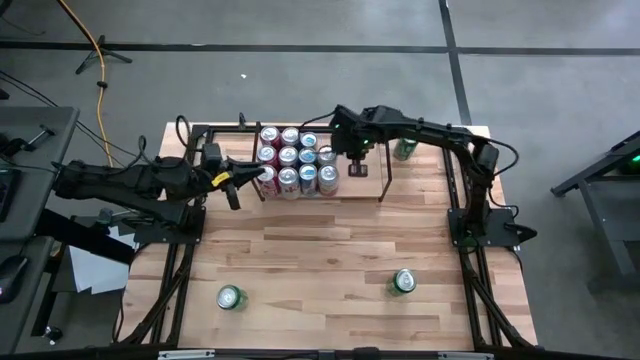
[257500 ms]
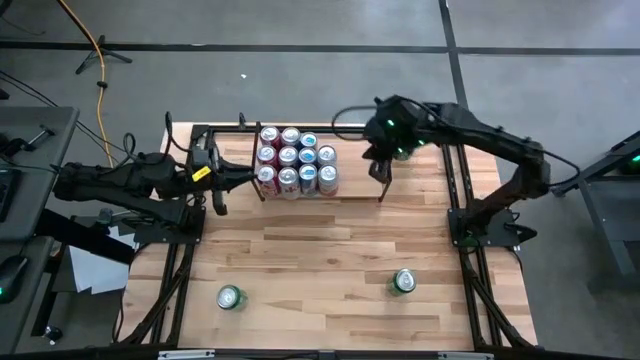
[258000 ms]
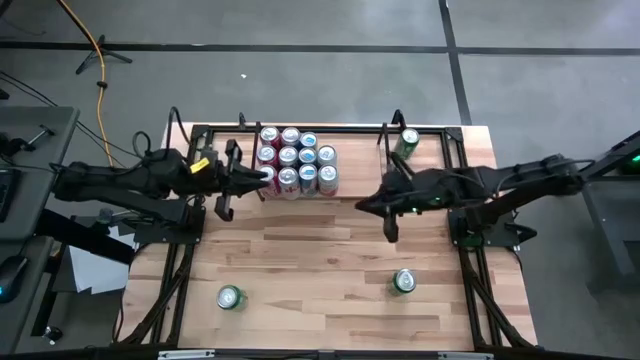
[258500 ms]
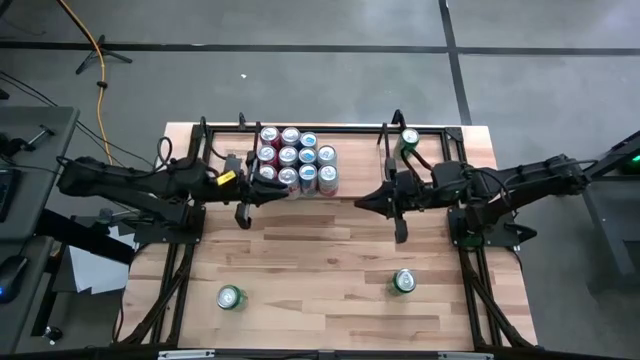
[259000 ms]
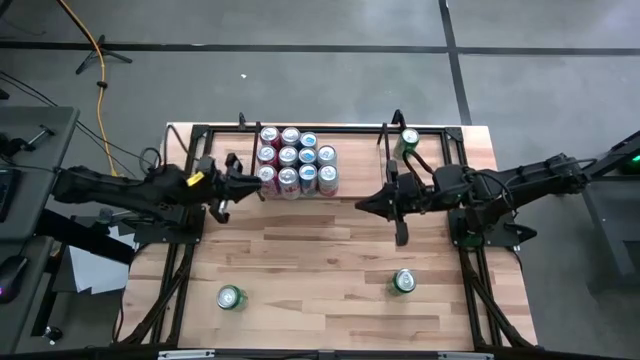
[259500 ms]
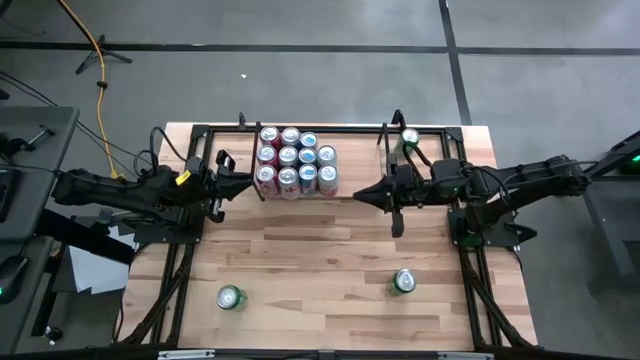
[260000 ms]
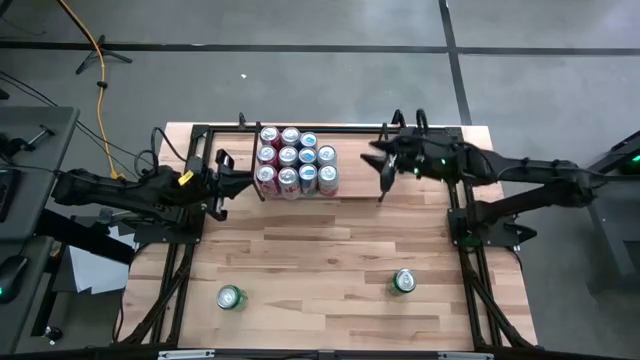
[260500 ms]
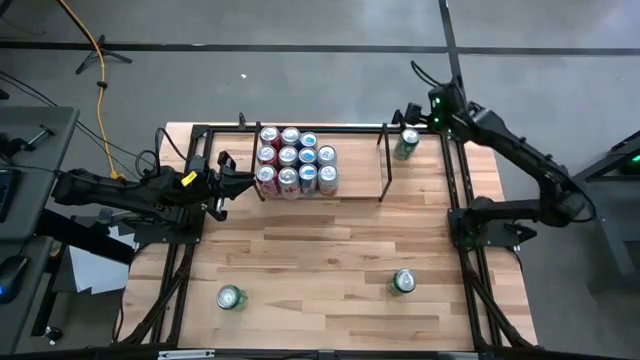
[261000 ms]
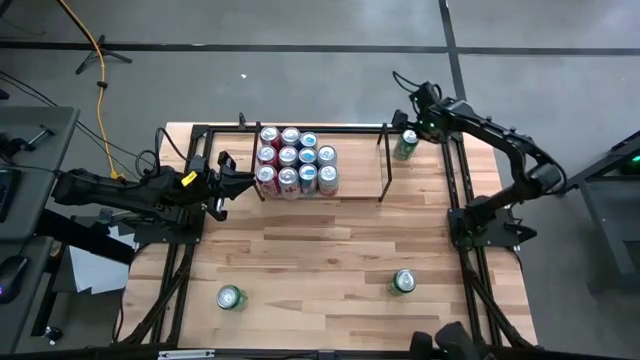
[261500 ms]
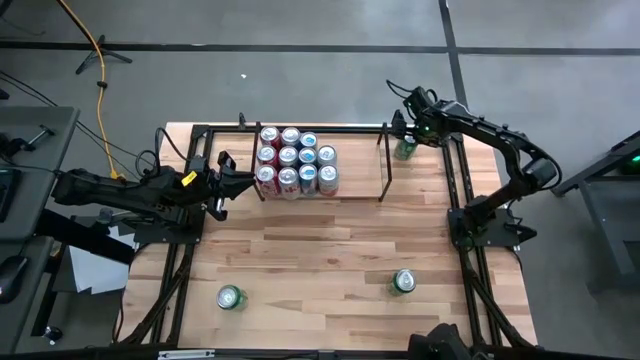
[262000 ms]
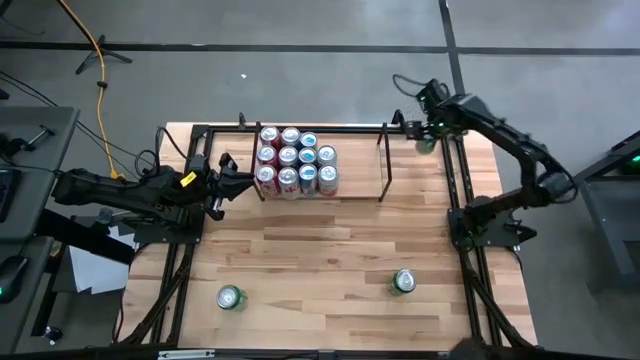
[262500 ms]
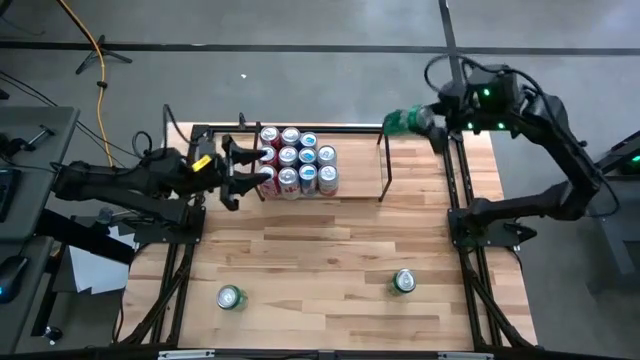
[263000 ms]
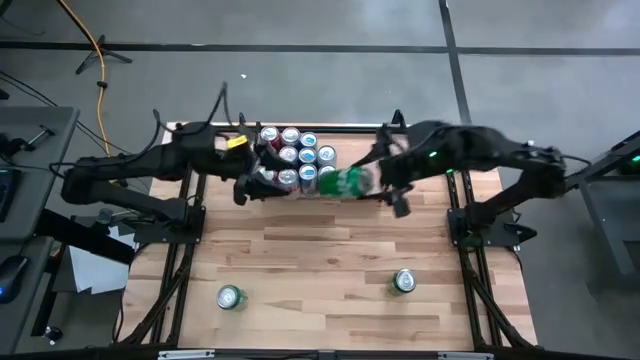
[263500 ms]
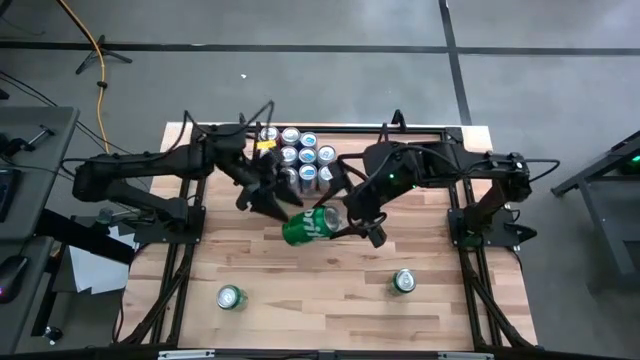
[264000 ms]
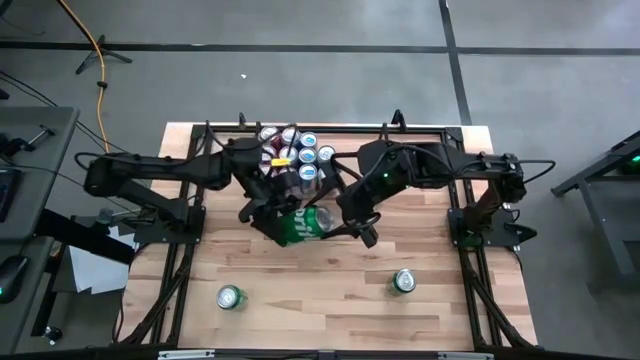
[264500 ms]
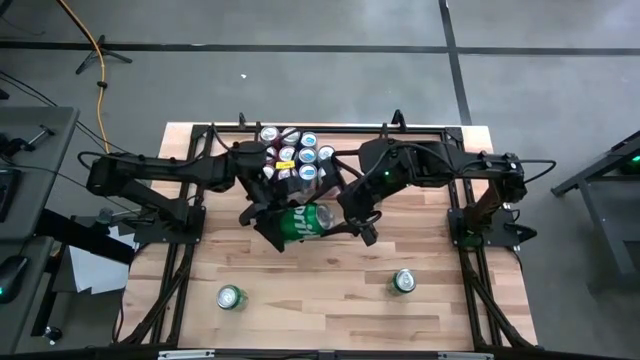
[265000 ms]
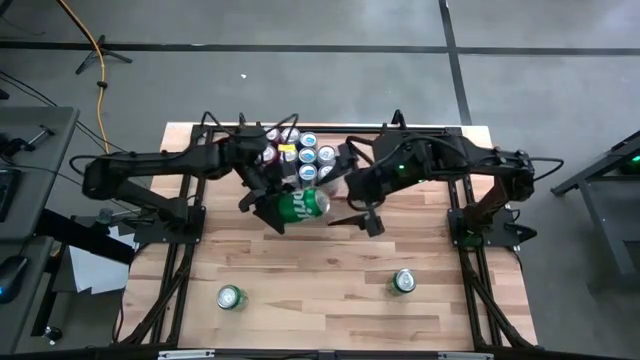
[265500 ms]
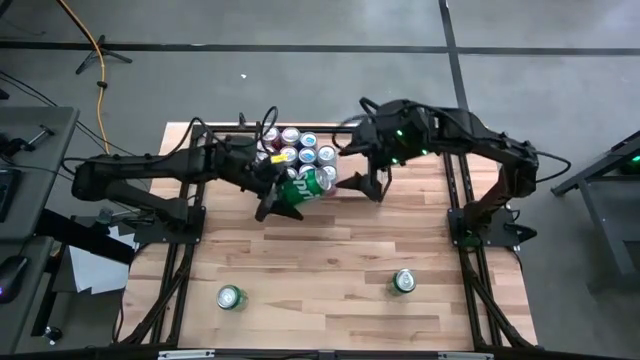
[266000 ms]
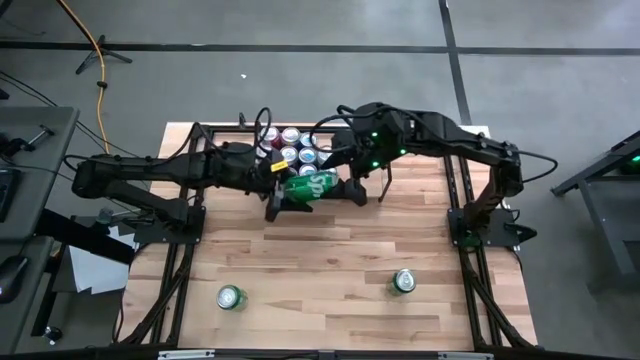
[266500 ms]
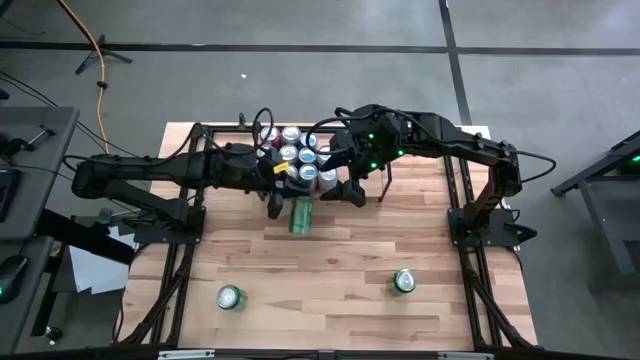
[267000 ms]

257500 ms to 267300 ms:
Task: Place canned beverage on shelf
Put the top green soda can on the shelf

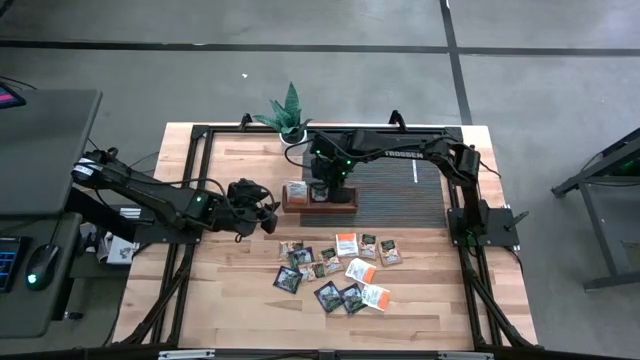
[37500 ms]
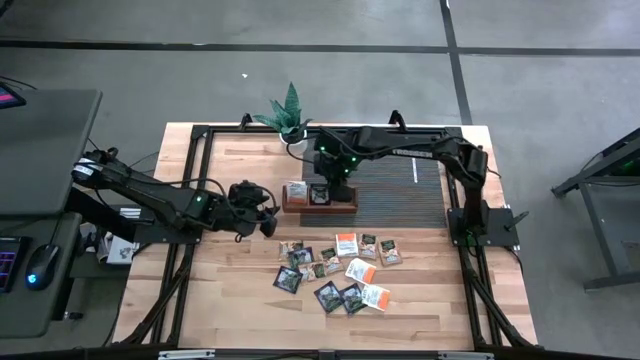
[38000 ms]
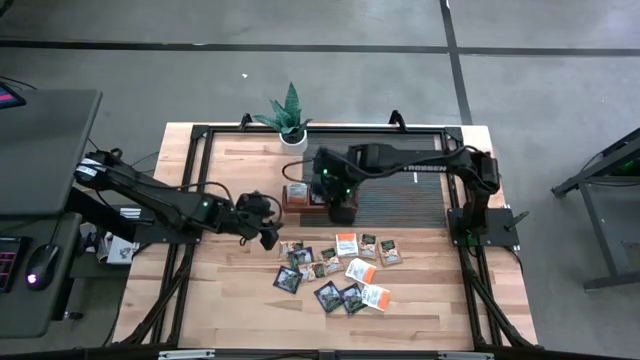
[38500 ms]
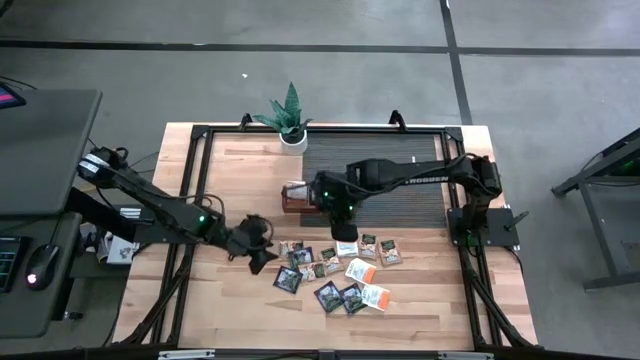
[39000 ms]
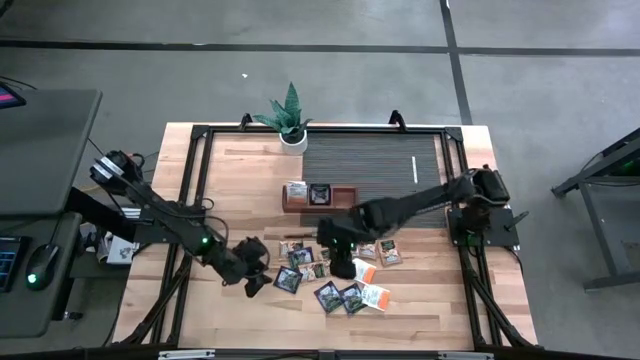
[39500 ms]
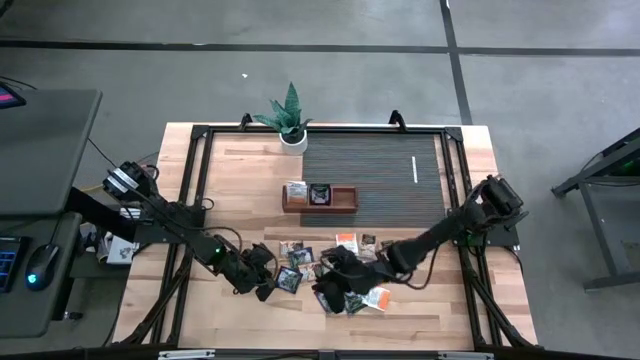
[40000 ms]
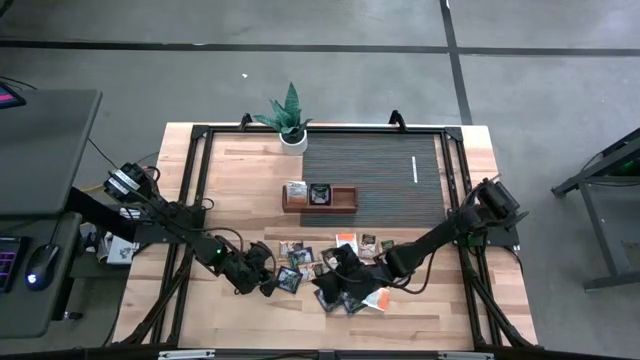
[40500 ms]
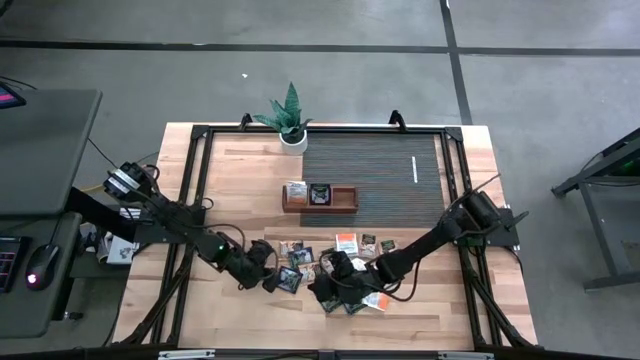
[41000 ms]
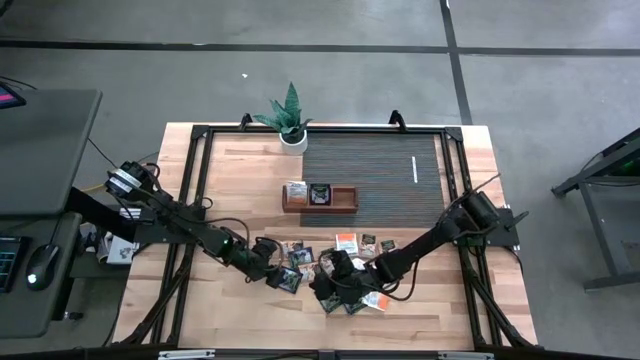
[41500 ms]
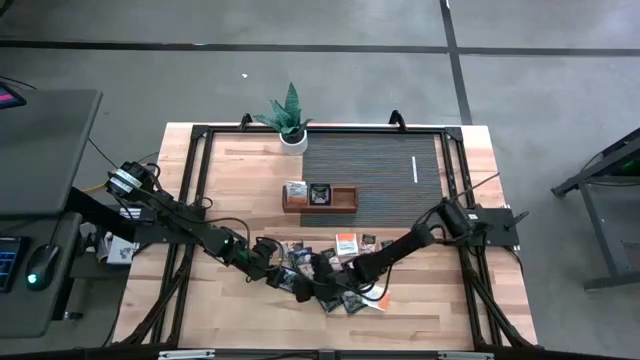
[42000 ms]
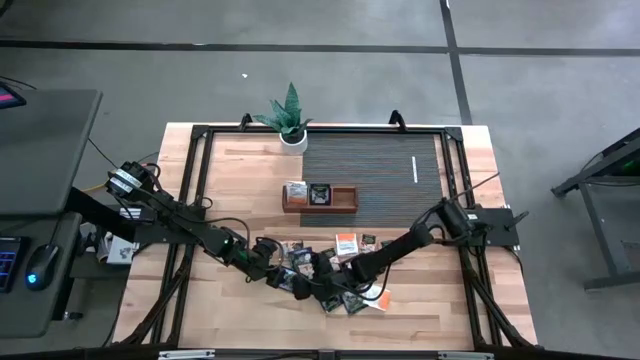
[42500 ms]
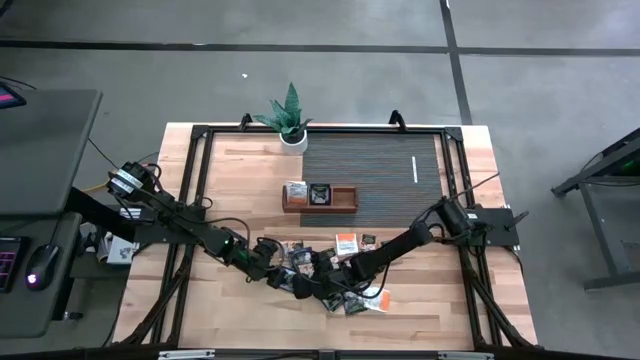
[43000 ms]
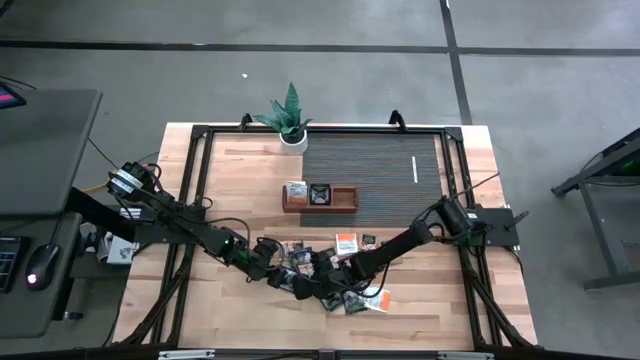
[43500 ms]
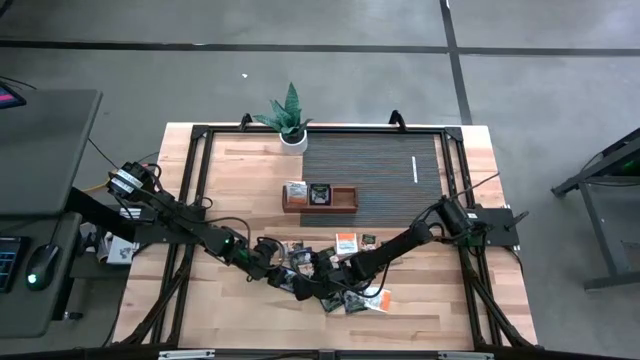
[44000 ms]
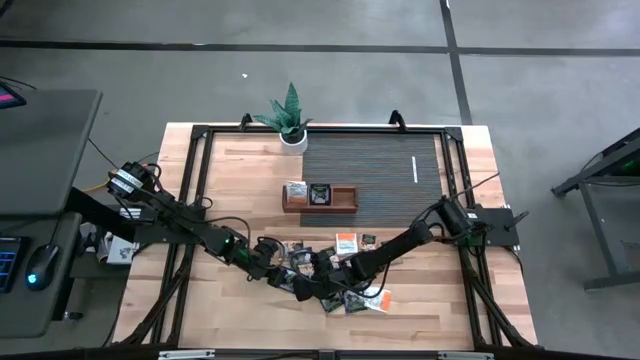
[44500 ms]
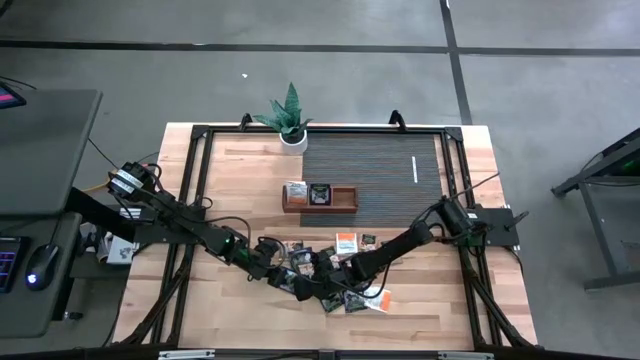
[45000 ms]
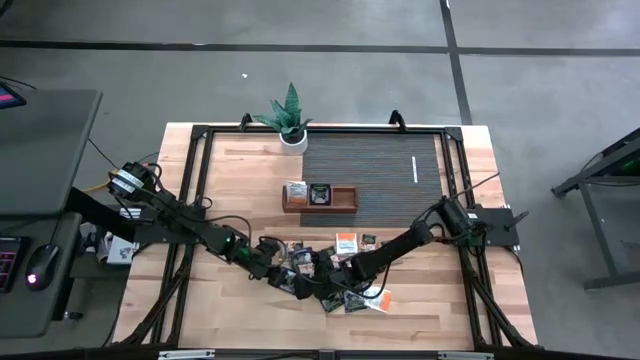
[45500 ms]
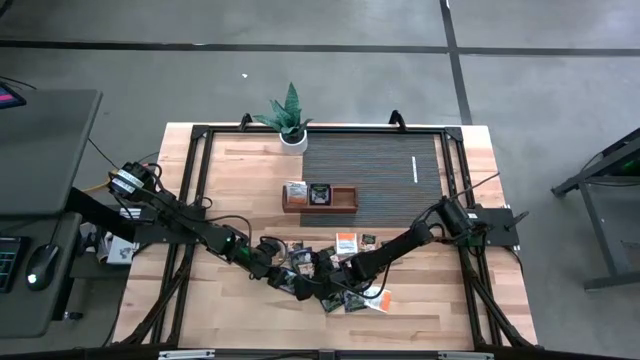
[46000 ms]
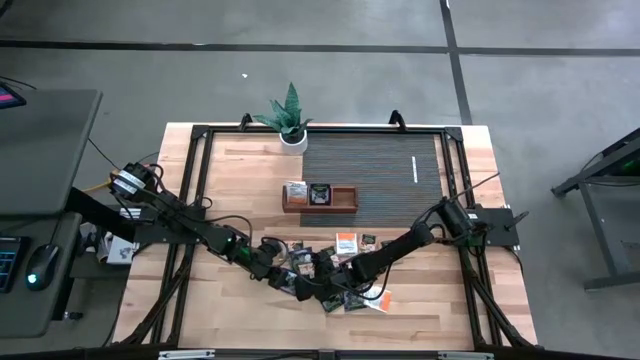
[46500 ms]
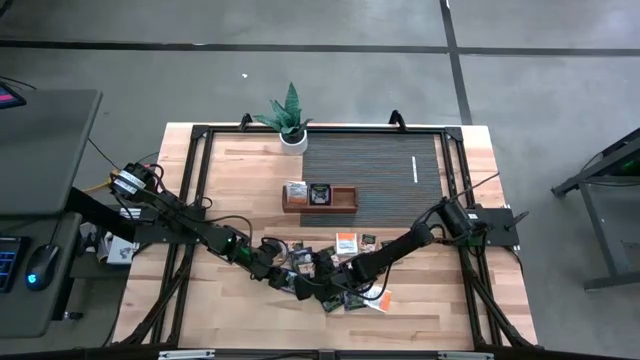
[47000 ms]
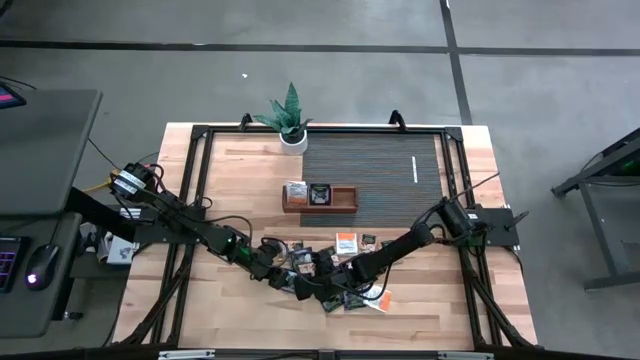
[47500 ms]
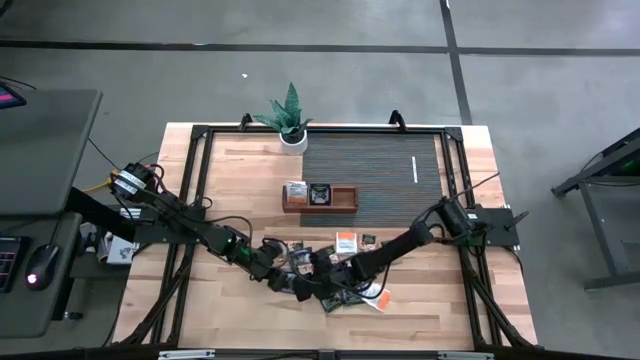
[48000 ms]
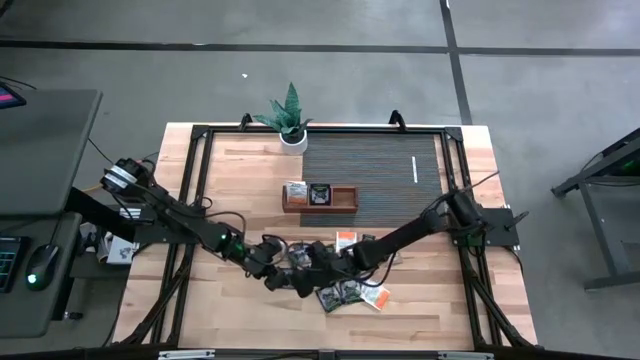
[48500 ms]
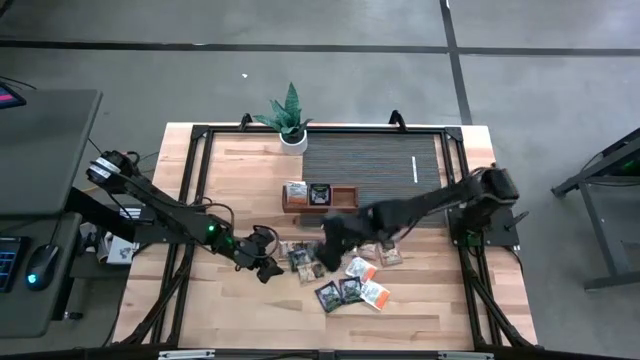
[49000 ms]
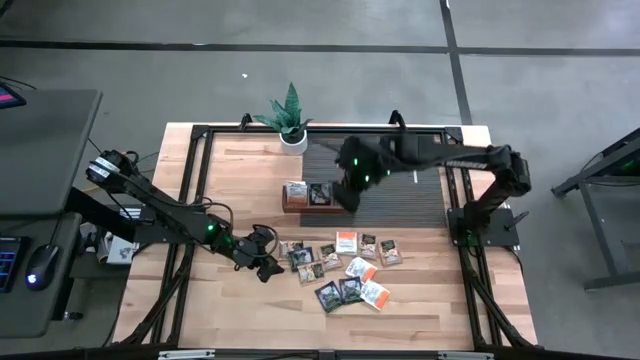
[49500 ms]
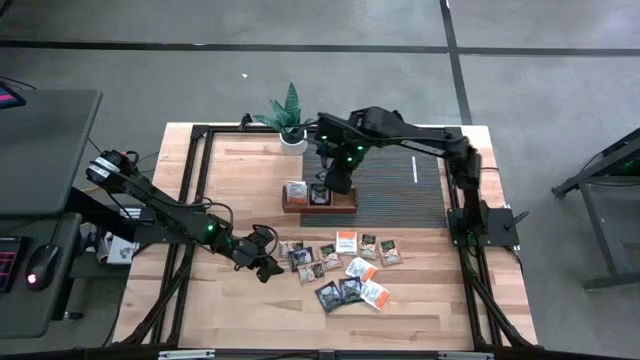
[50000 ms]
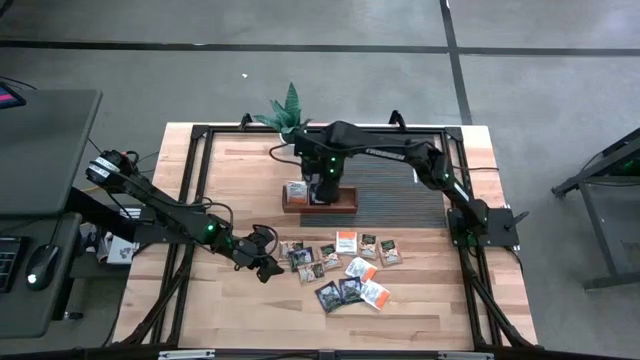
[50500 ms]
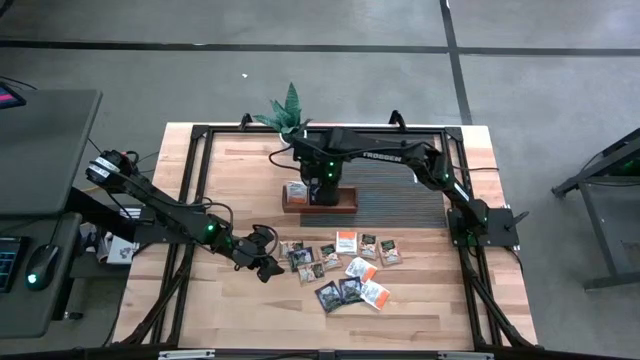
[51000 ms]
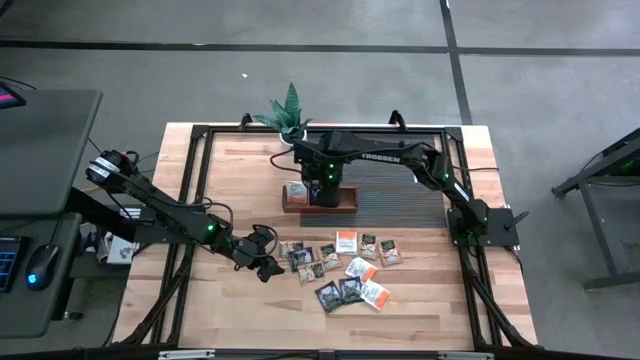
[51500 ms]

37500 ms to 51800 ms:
Task: Pick & Place Tea
Put the blue tea bag into the middle section of the wooden organizer
